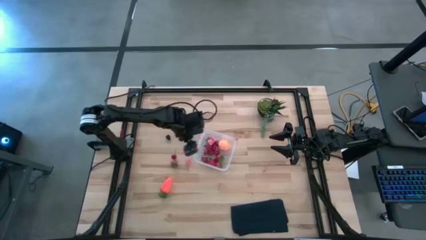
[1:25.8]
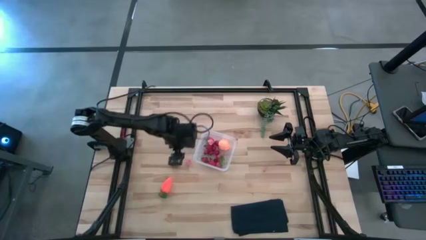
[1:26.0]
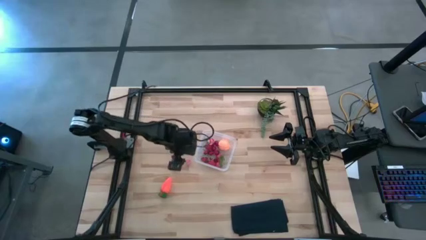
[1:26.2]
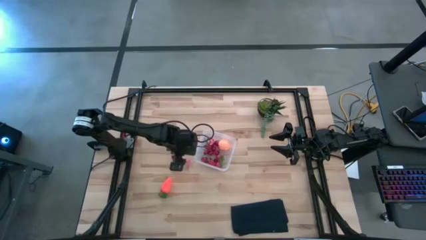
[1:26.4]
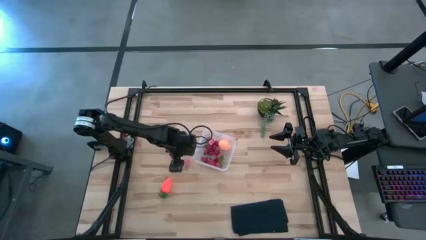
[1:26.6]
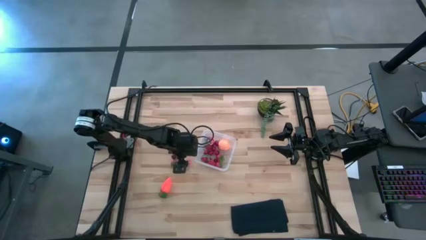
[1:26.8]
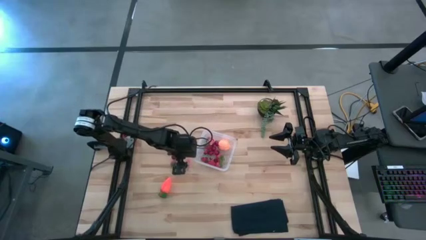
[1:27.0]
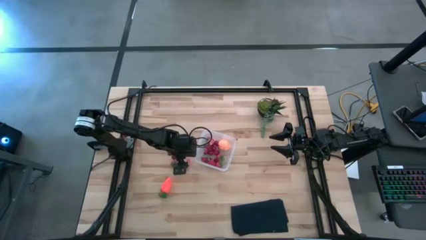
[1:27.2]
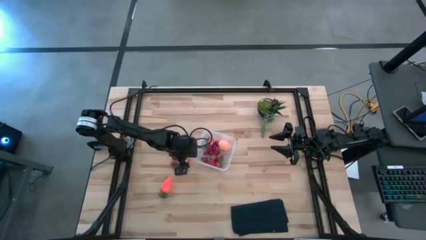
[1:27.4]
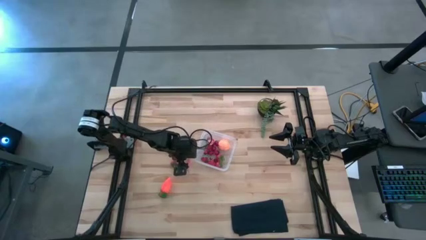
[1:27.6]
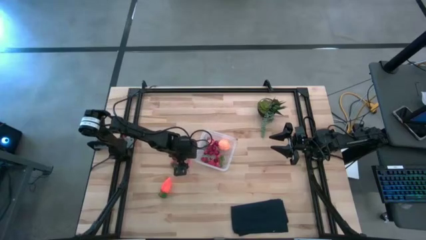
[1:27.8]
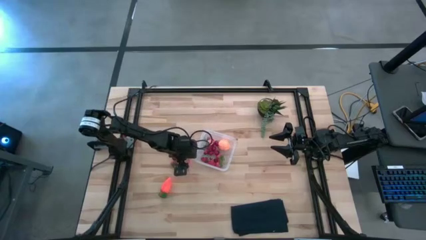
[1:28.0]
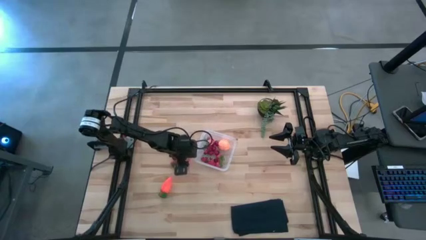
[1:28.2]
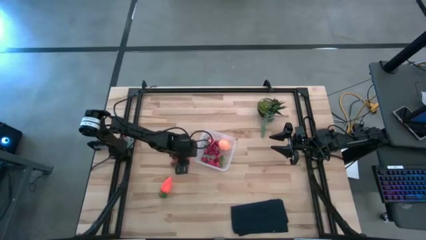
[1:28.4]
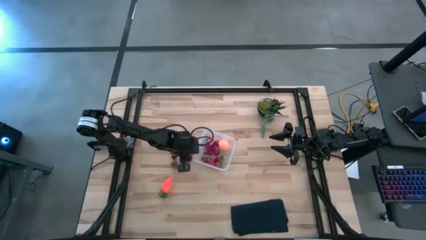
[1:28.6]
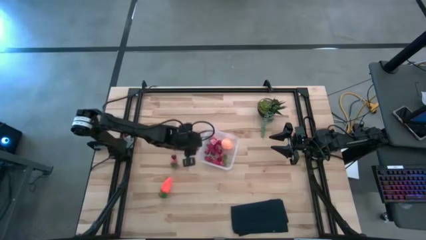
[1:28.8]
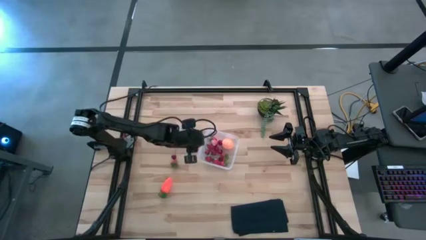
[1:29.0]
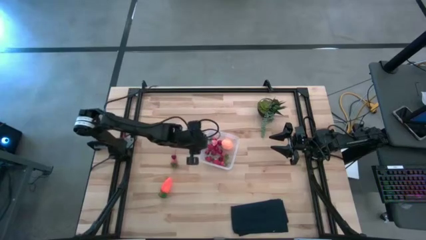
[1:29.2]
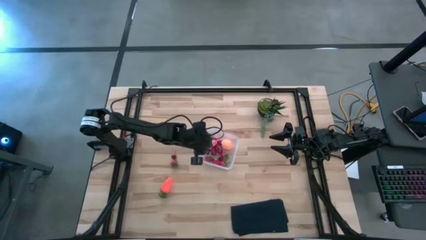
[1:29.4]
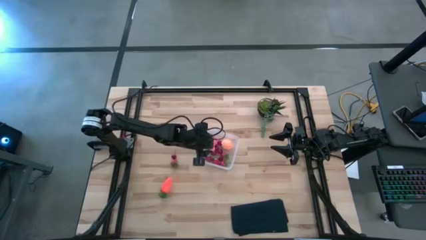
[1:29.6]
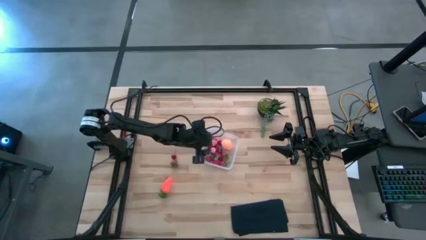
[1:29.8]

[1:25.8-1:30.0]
Task: Pick and placing Produce into tupperware
Put the small peach into the transparent bin

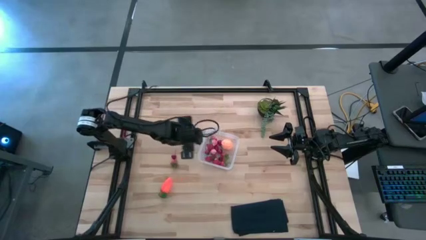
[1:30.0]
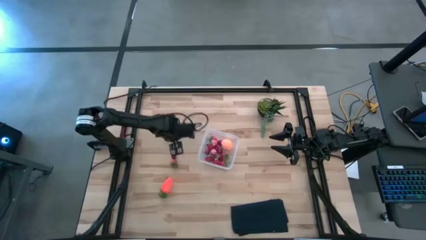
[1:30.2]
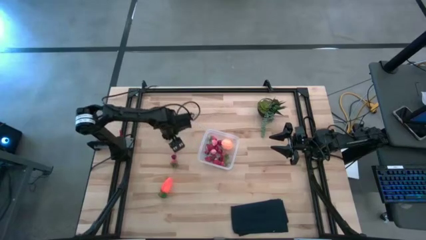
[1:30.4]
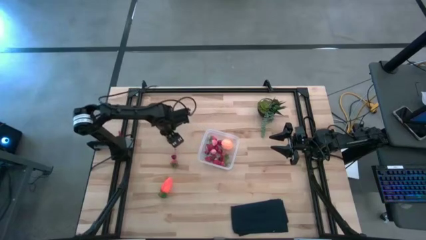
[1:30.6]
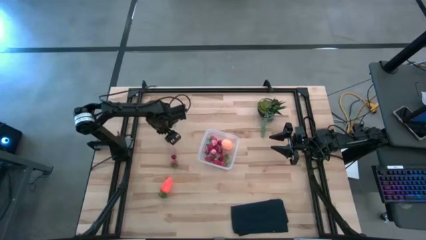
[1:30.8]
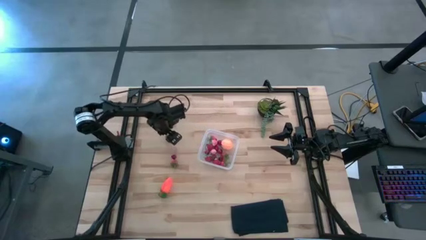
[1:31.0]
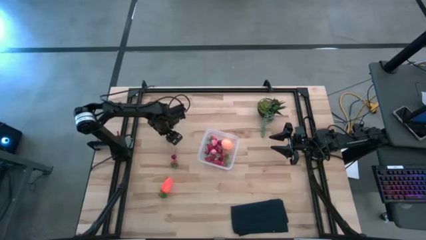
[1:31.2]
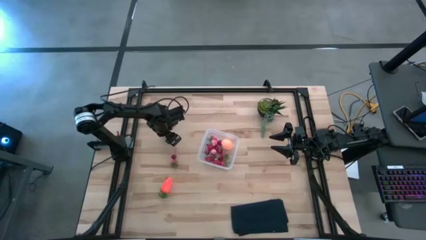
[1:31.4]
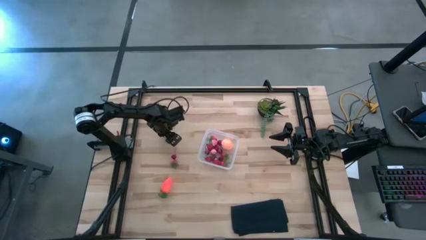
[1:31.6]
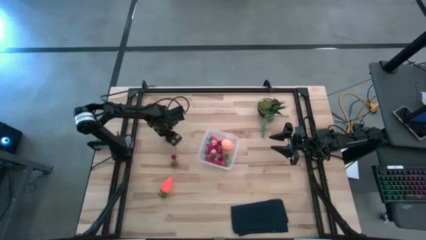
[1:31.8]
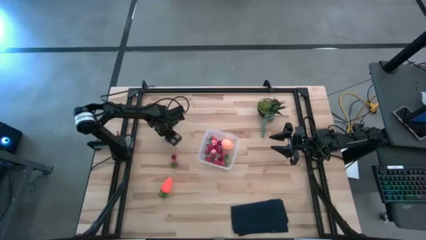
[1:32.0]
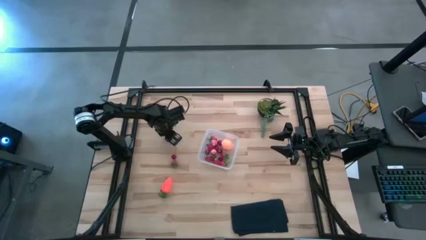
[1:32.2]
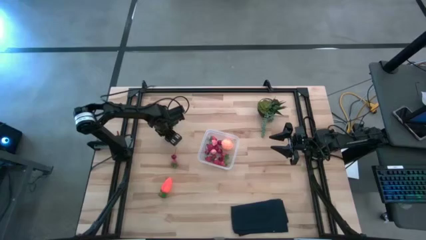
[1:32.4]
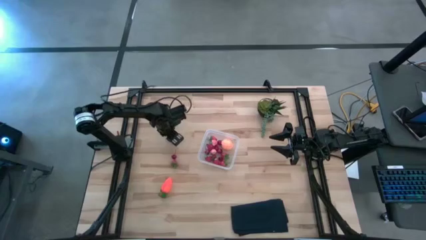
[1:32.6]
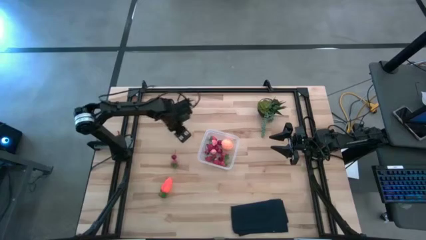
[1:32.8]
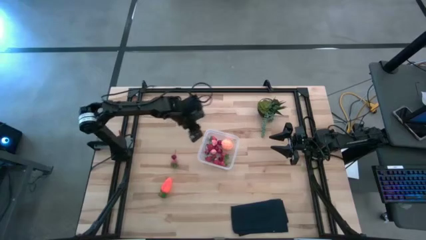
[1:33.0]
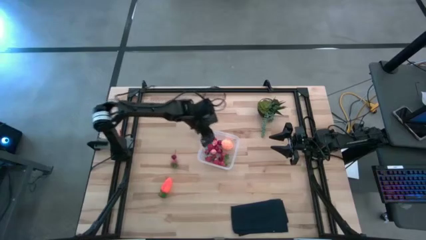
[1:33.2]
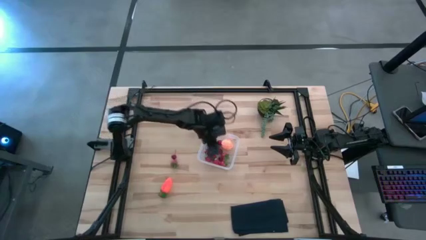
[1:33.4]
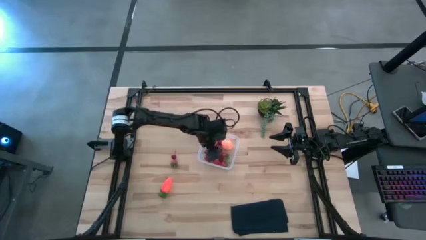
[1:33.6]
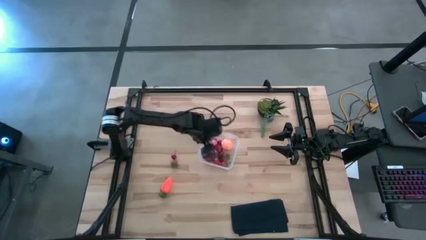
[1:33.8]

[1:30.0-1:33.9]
Put the blackberry into the transparent bin

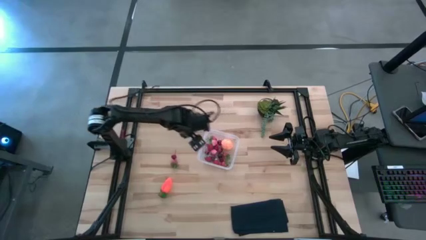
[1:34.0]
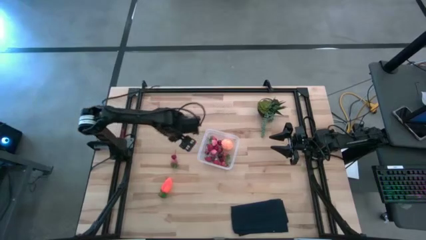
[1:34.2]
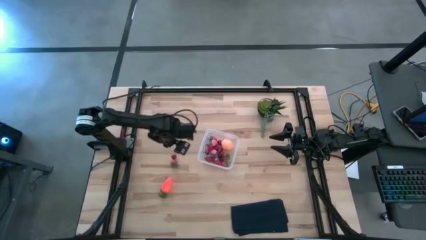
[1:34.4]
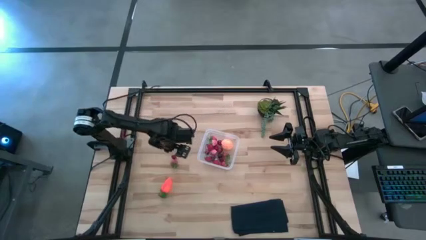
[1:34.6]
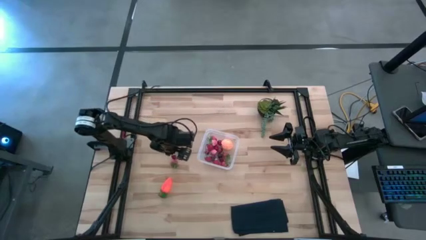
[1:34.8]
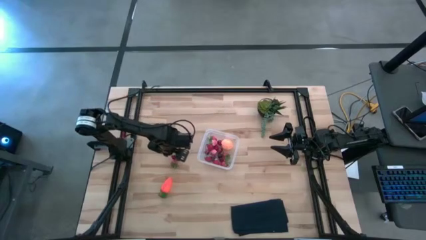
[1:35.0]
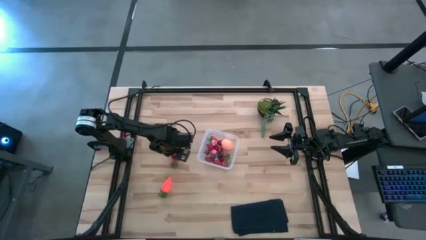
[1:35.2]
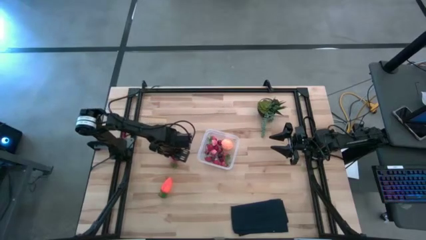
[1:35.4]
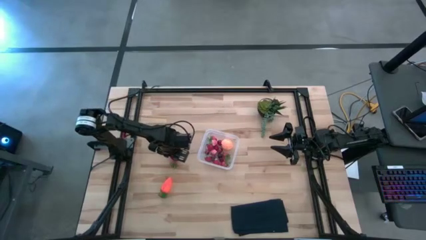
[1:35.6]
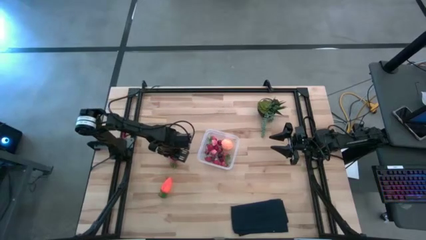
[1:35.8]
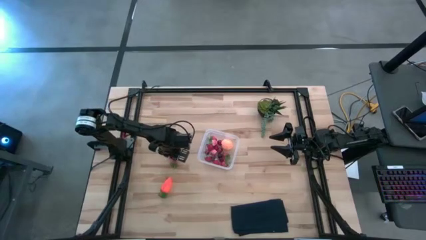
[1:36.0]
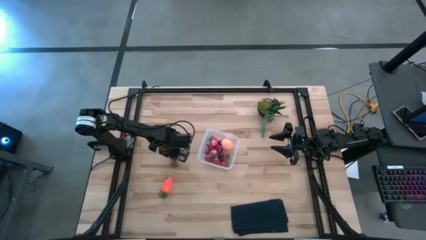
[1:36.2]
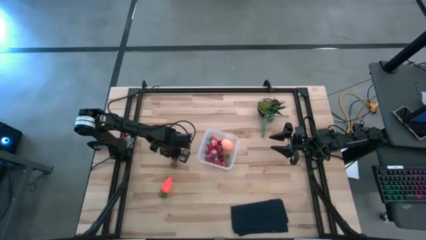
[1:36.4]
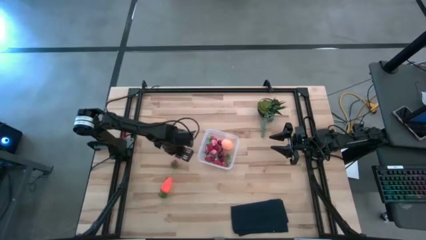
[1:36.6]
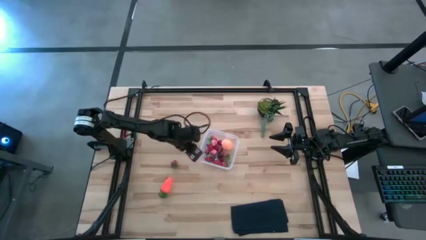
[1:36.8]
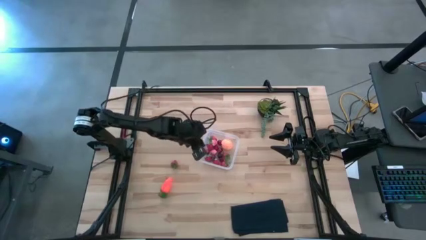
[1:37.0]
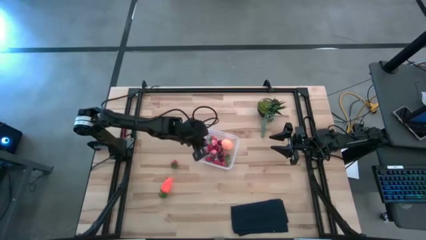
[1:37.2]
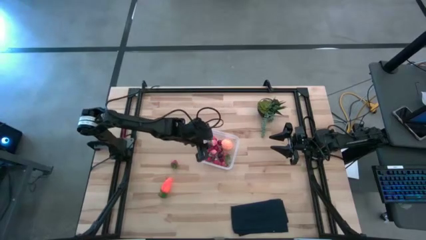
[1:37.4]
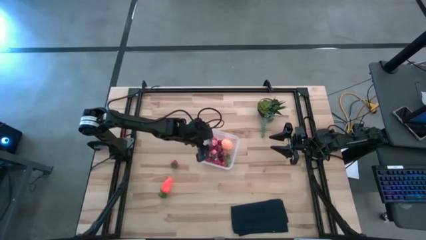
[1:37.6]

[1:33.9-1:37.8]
Put the red cherry into the transparent bin

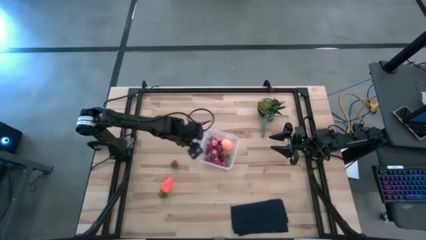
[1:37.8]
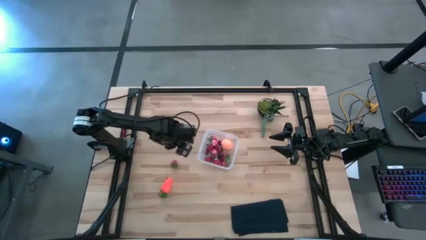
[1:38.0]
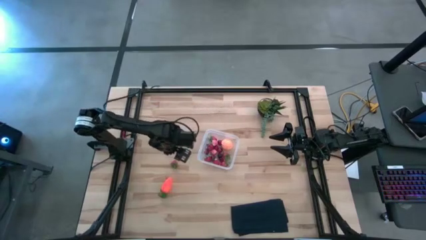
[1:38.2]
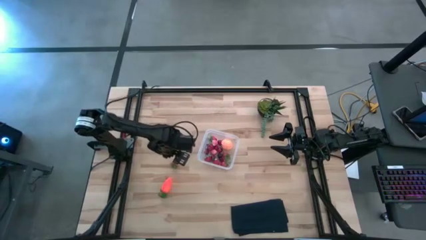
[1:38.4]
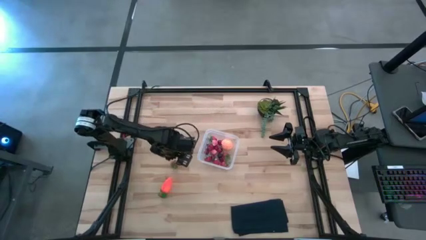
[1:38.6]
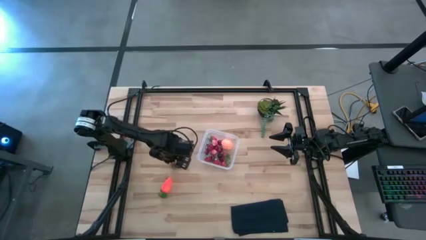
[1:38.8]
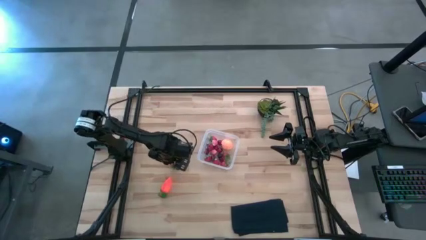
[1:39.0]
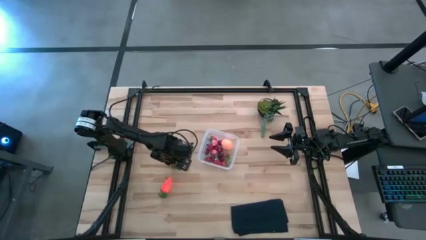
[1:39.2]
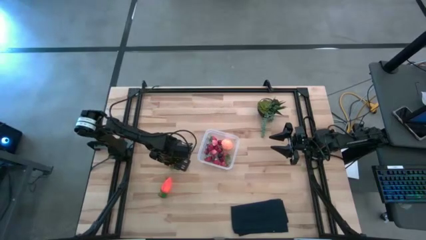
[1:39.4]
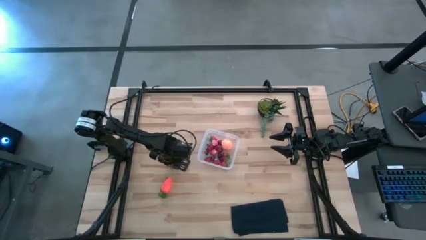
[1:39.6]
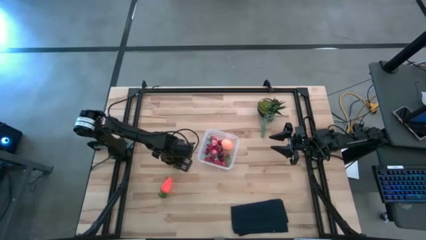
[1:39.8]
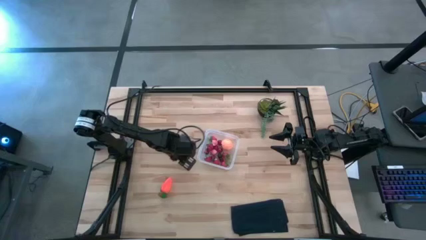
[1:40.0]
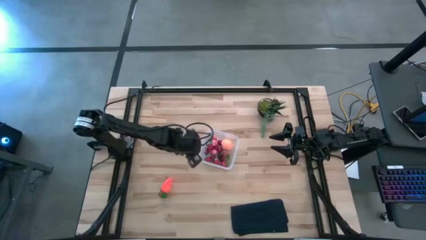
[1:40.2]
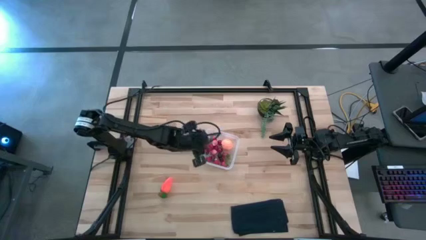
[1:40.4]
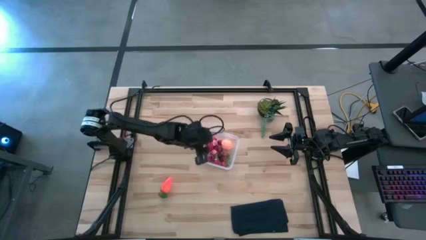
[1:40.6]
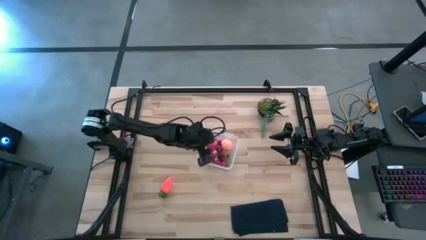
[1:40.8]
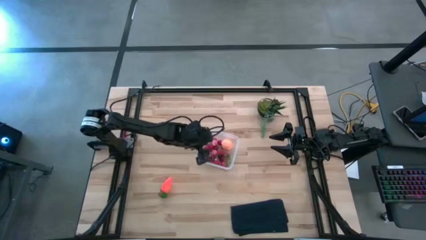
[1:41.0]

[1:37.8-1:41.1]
Put the strawberry into the transparent bin

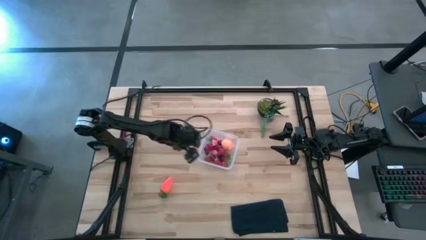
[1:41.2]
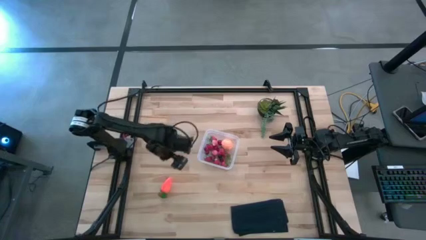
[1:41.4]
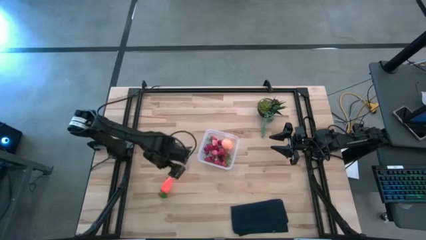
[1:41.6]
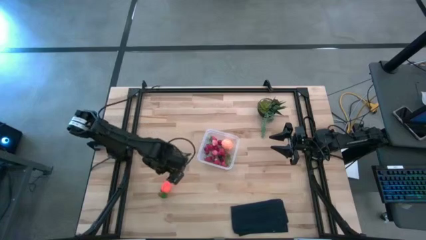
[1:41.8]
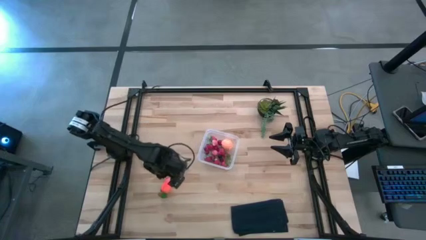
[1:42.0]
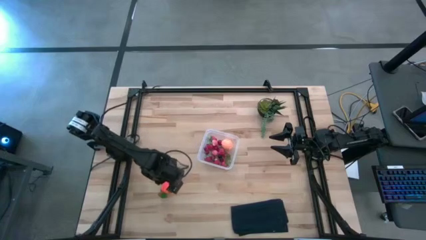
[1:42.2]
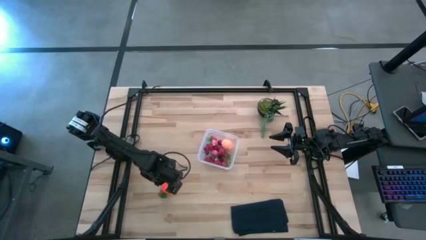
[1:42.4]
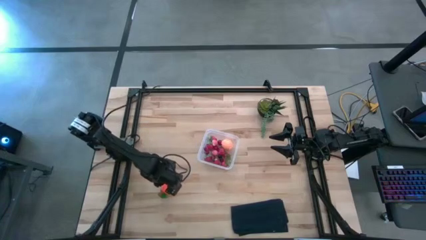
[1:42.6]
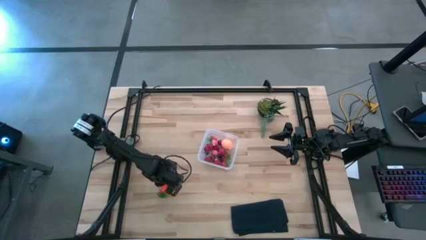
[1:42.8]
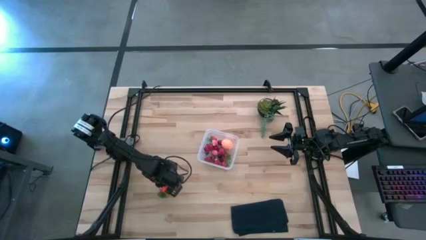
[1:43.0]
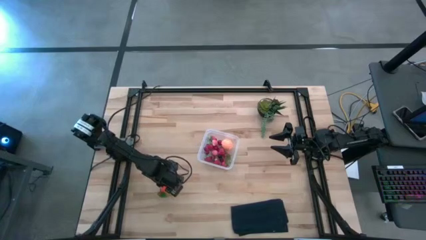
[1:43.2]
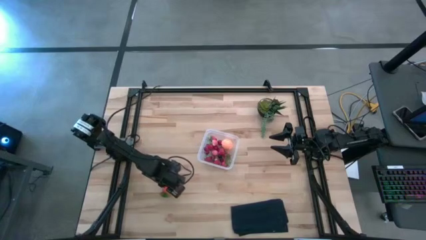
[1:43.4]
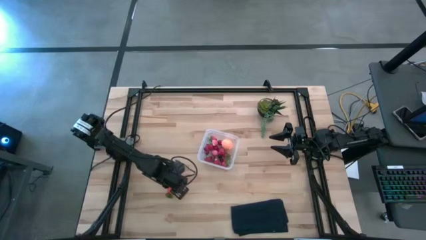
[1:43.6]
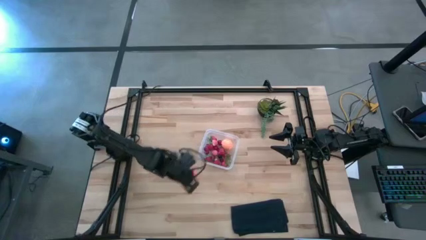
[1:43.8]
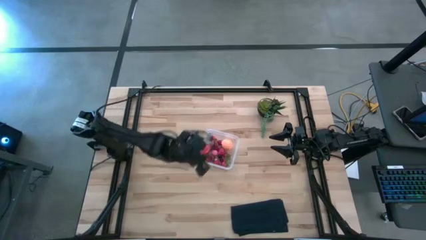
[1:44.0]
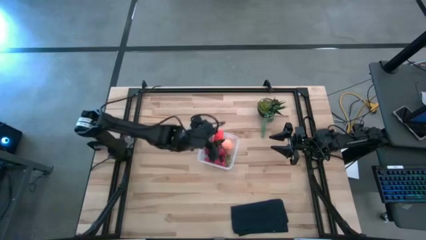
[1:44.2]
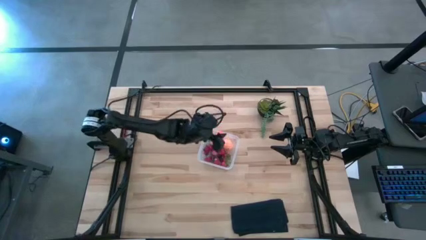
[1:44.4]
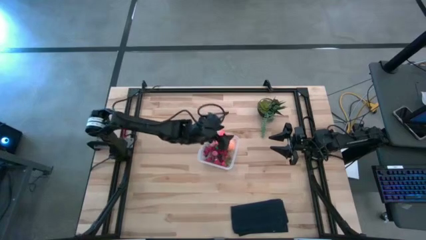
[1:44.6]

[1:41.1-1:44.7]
Put the carrot into the transparent bin
